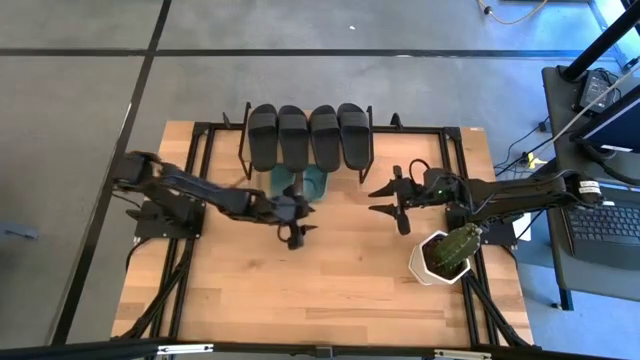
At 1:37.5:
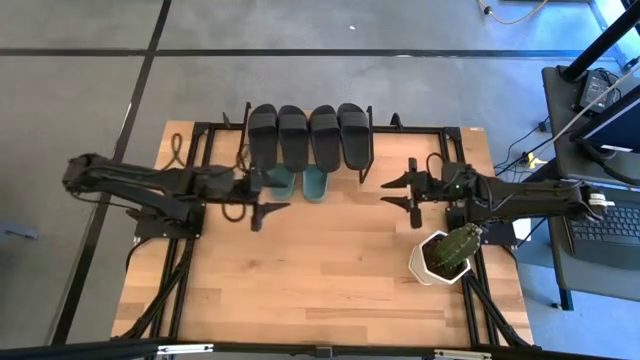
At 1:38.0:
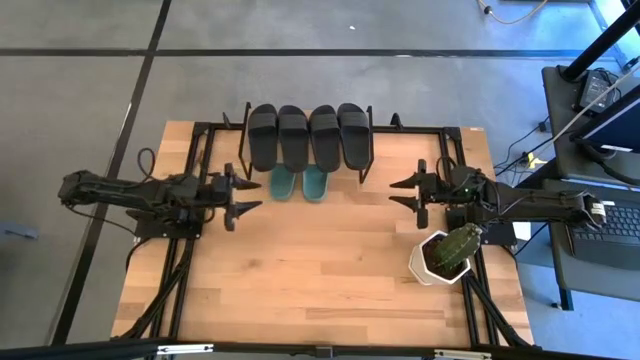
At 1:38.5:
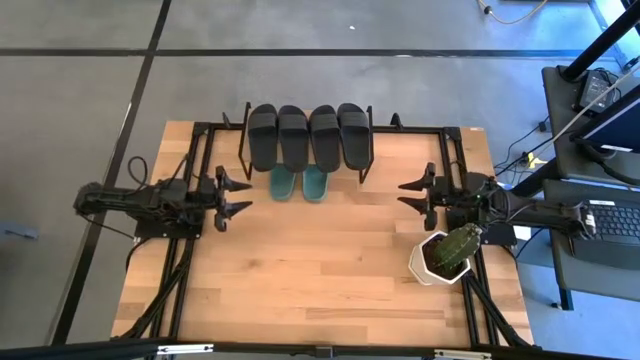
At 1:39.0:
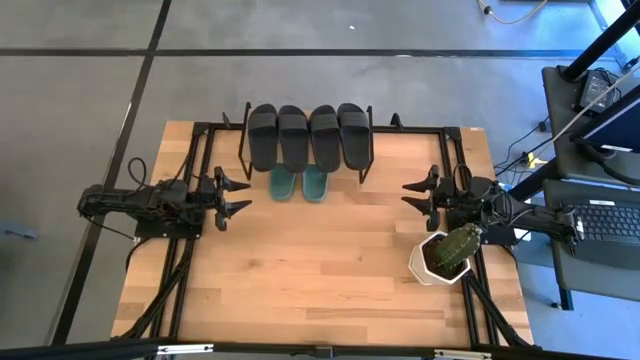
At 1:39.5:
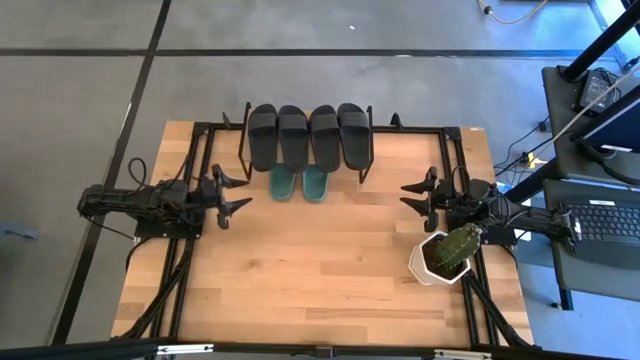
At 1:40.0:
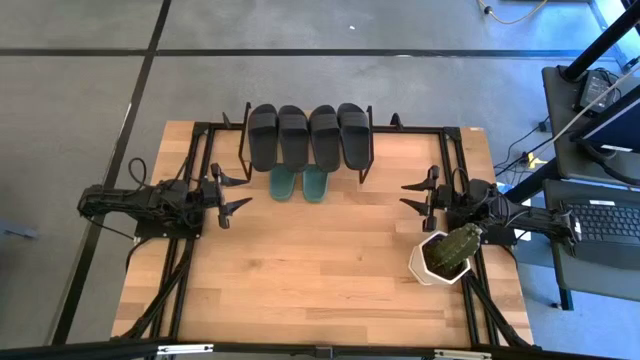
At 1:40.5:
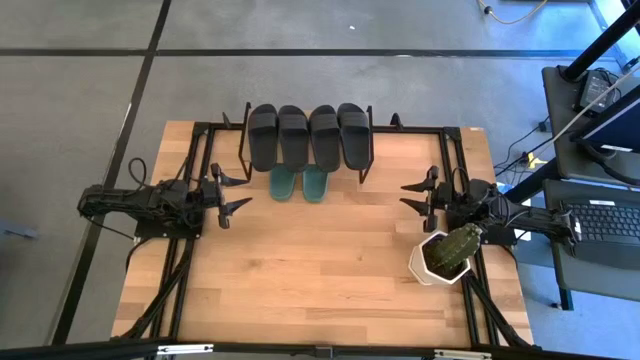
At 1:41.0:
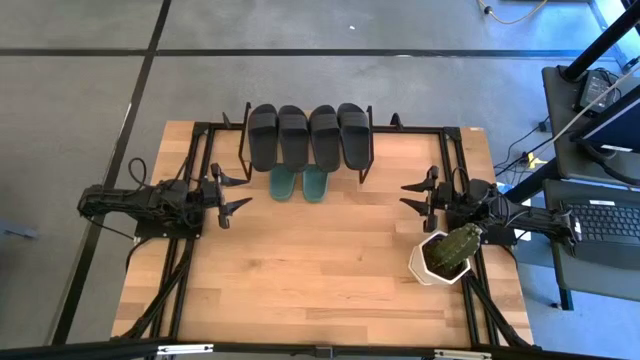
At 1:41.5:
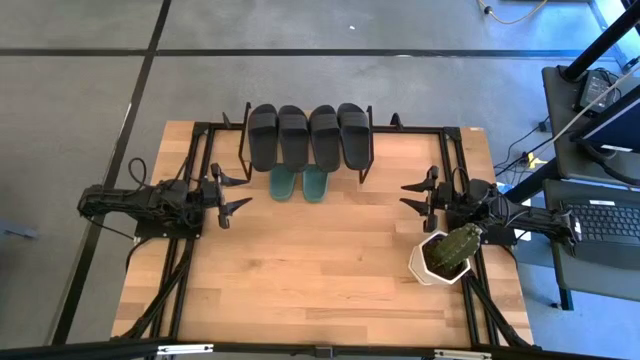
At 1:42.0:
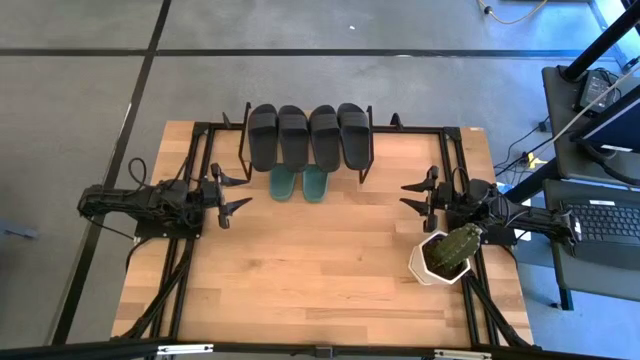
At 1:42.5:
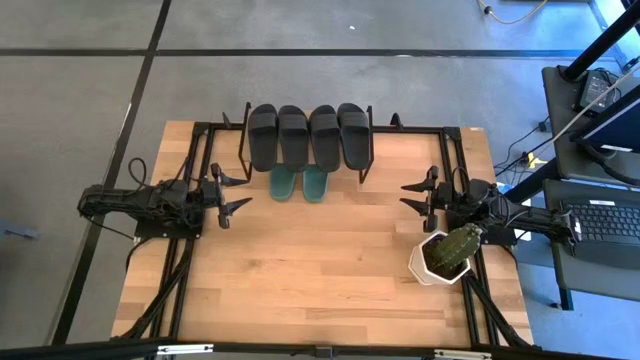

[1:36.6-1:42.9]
Task: Pick and place slides into the shelf
Return to Home Position

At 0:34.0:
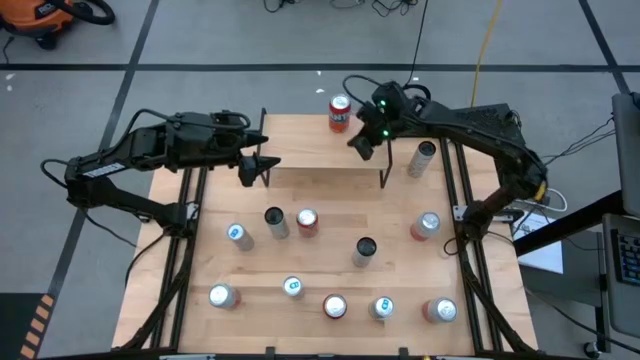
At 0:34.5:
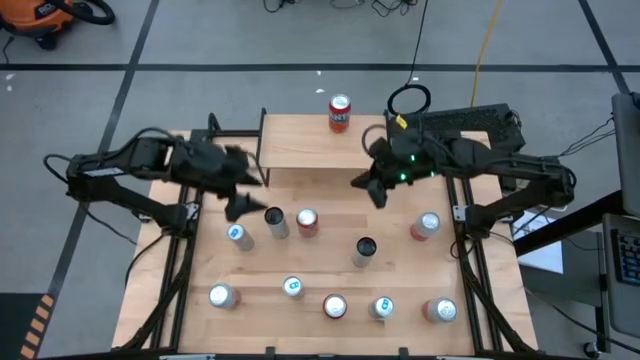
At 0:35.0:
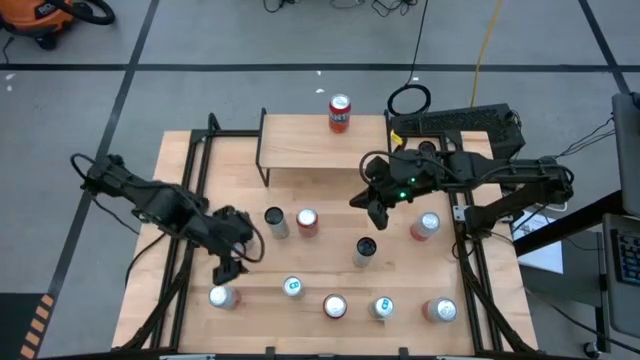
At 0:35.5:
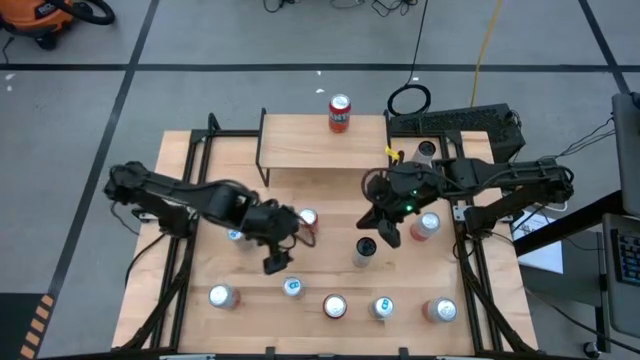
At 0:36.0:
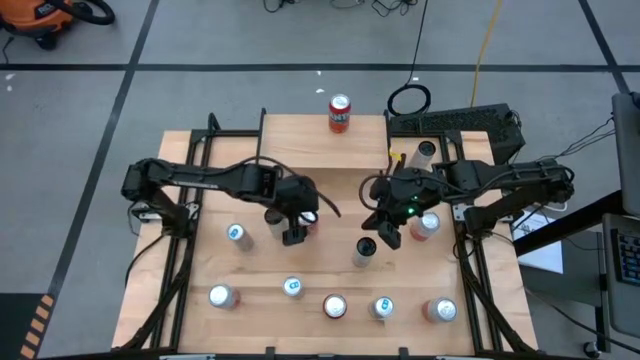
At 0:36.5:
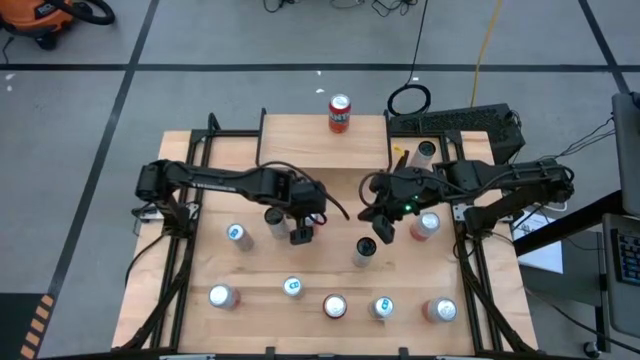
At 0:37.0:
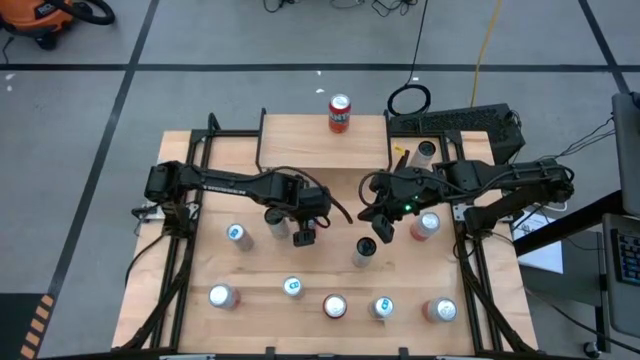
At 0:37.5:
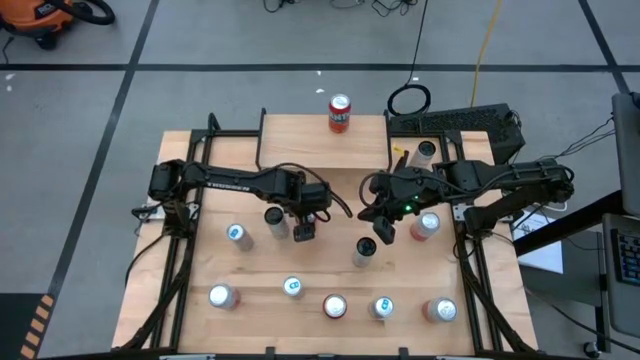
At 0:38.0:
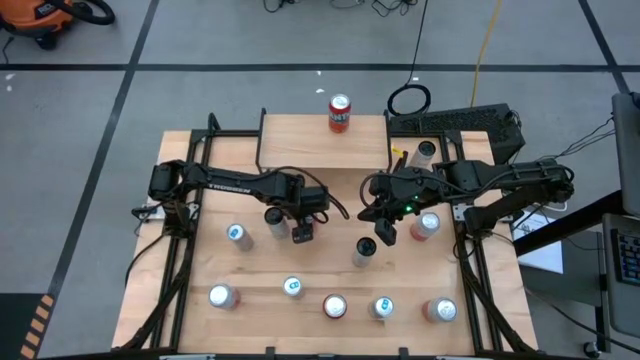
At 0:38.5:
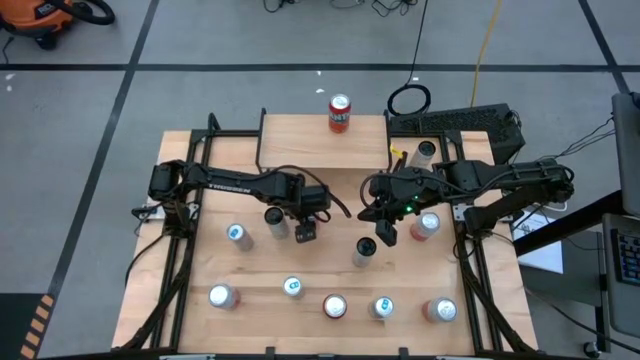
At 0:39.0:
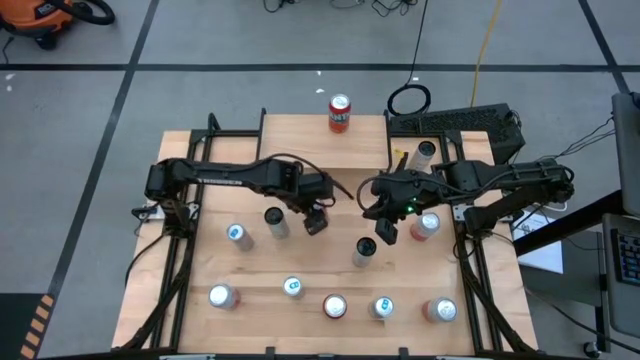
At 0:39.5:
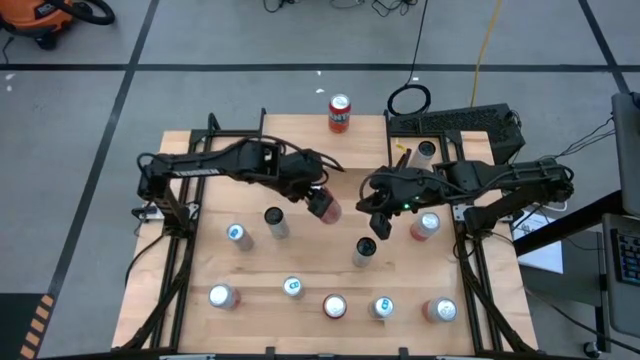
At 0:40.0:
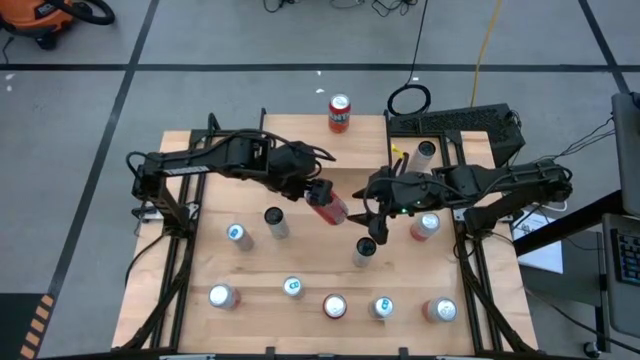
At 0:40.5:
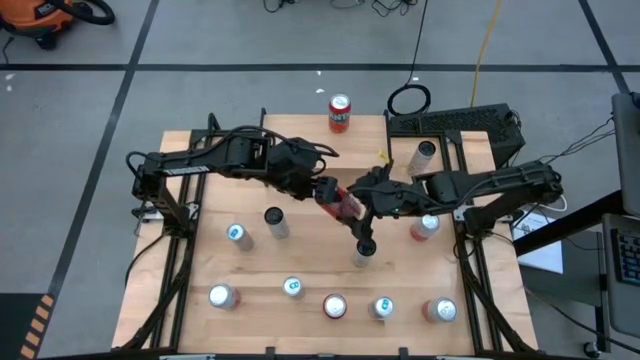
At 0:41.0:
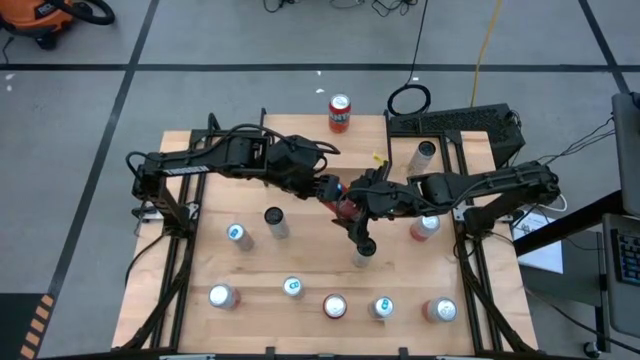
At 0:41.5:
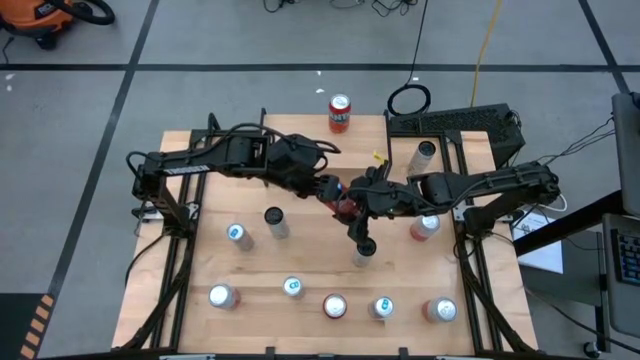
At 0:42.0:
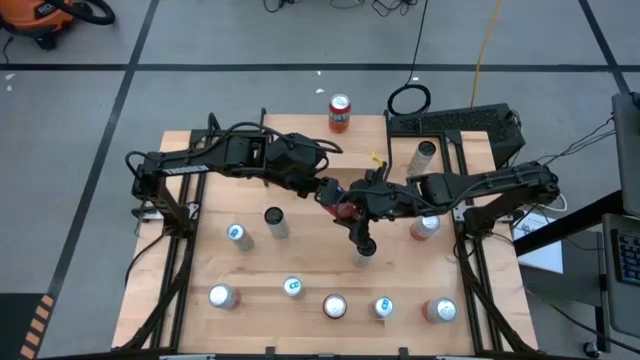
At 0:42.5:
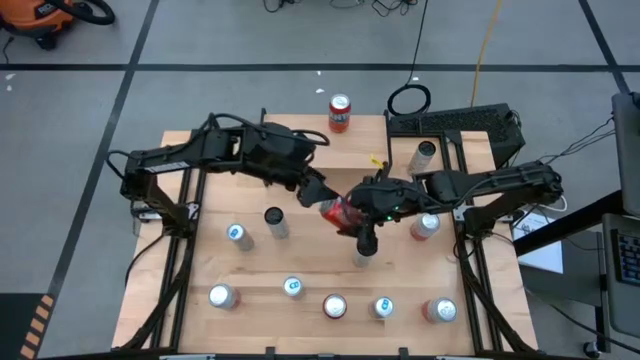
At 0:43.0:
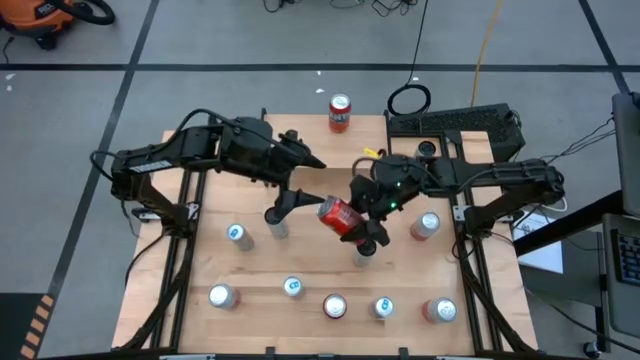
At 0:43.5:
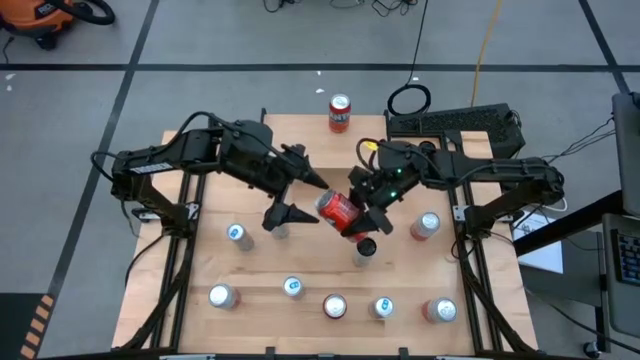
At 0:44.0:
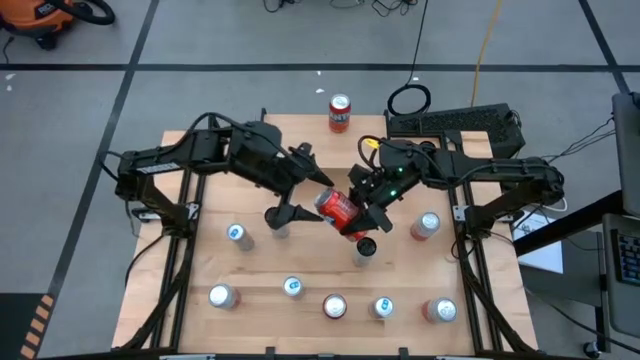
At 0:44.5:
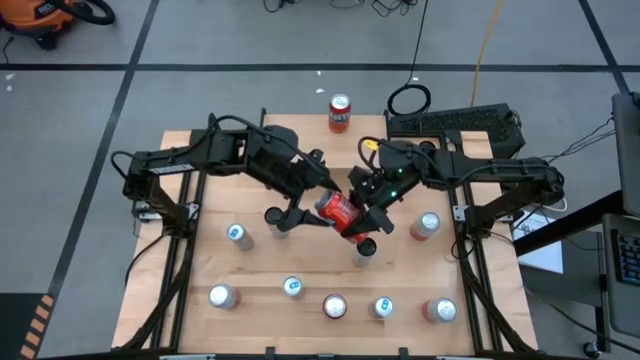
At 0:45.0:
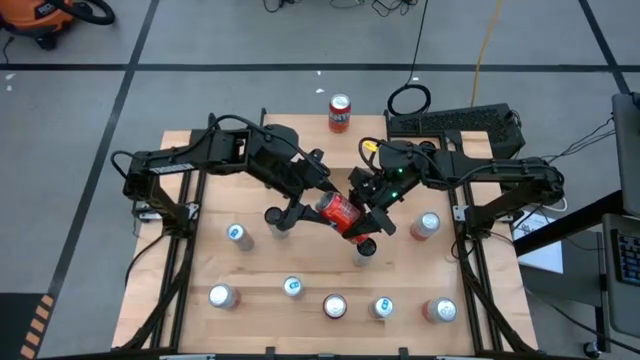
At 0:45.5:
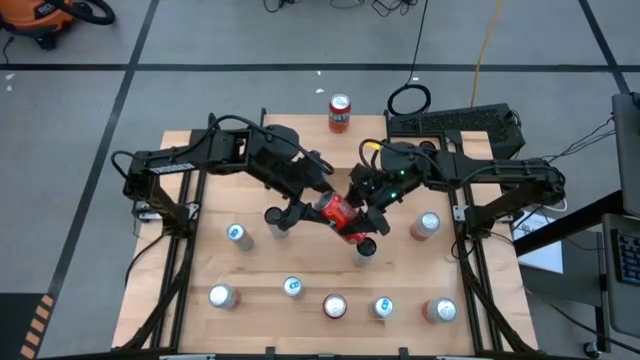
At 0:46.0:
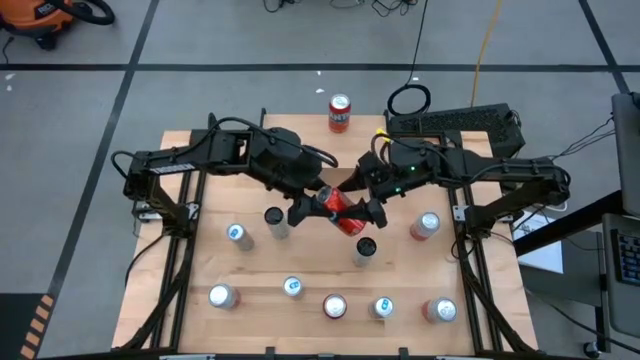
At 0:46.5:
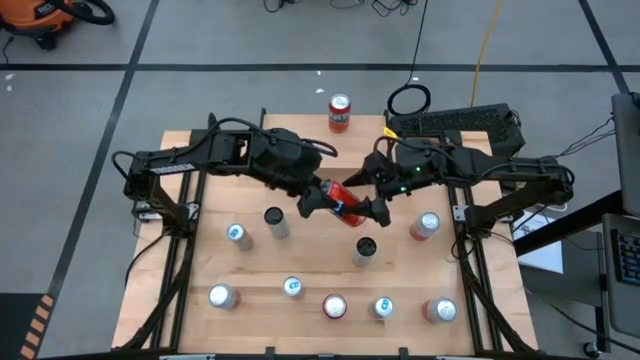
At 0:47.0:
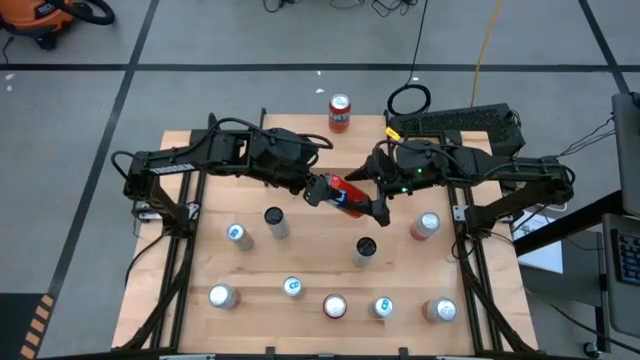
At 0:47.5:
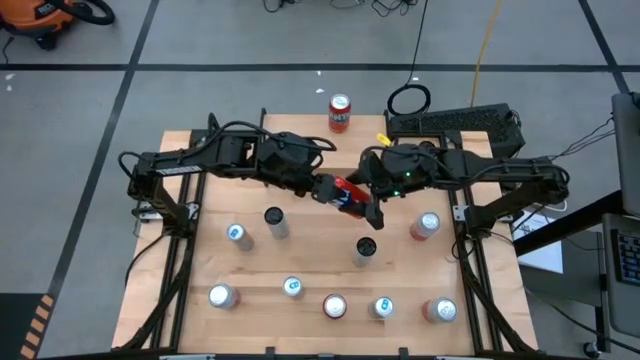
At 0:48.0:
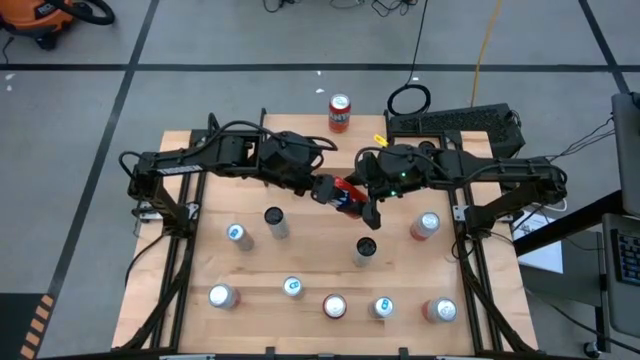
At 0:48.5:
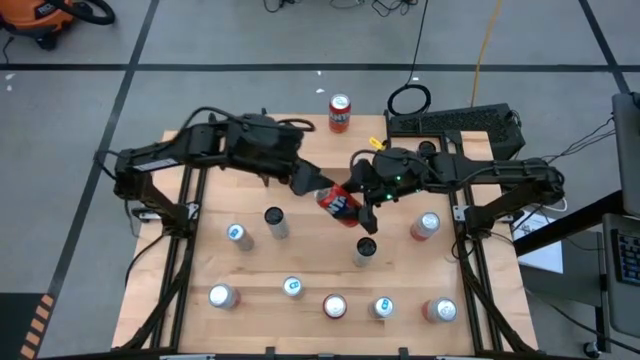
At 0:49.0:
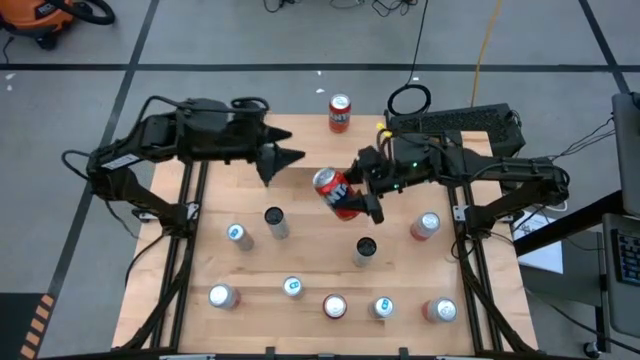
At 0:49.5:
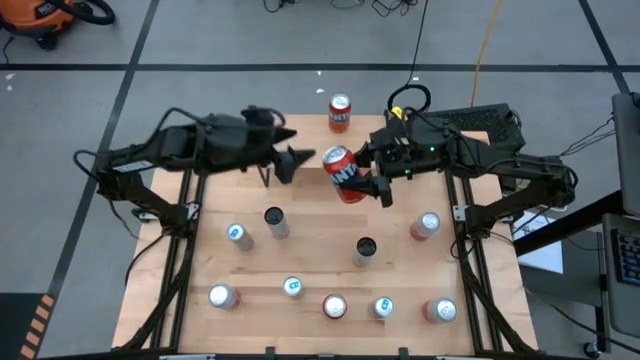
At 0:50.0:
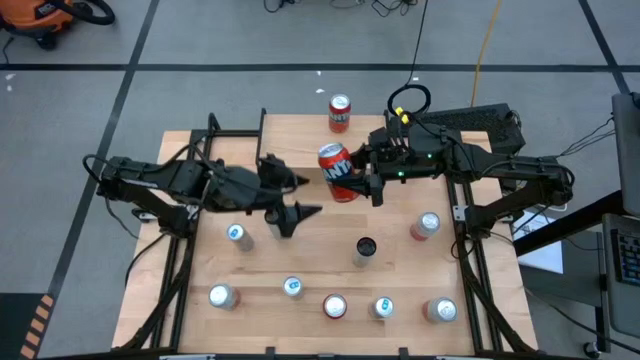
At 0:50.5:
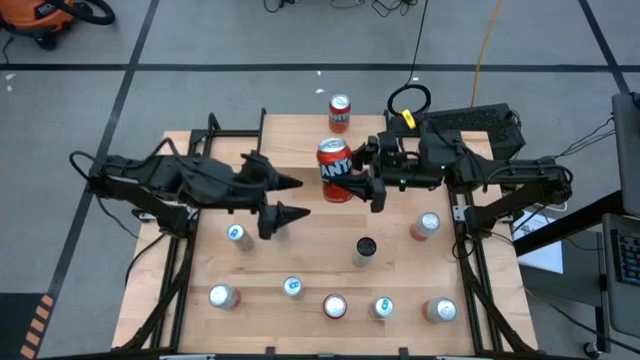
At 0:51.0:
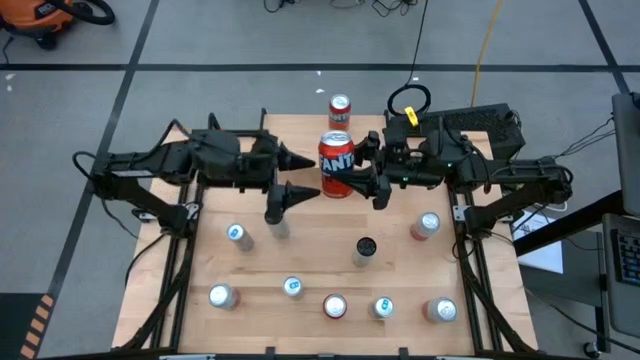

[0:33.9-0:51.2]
Task: Place canned beverage on shelf
Put the top orange soda can aligned with the other orange soda can on the shelf
